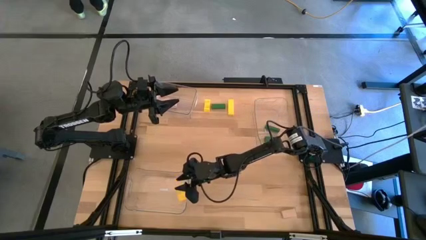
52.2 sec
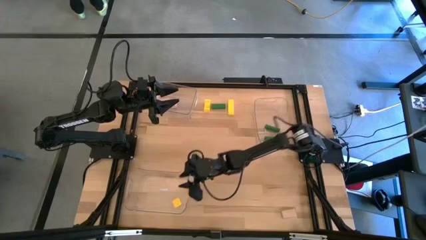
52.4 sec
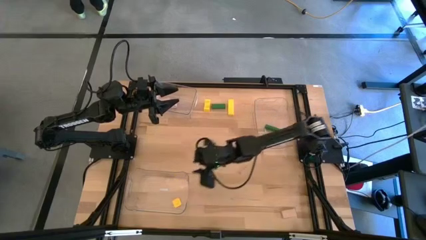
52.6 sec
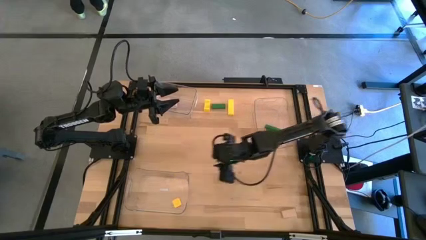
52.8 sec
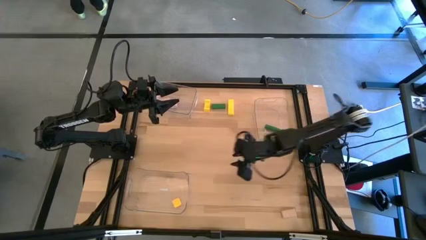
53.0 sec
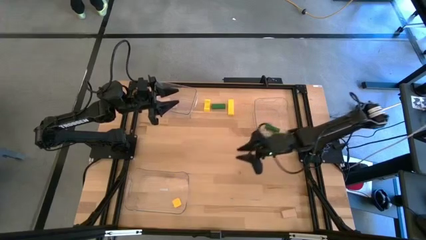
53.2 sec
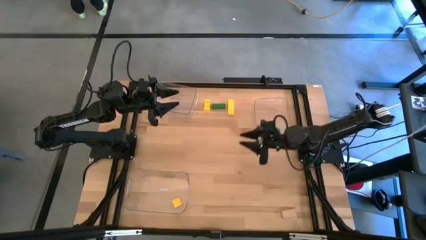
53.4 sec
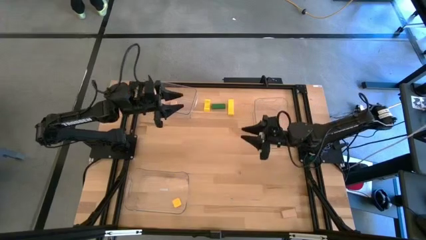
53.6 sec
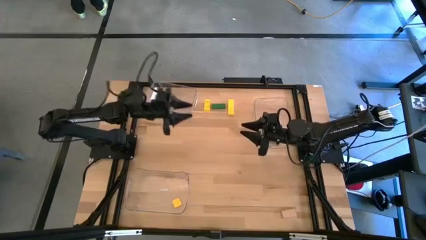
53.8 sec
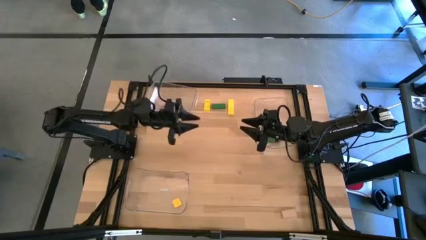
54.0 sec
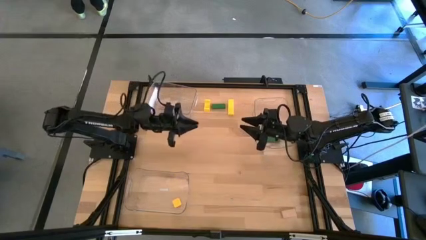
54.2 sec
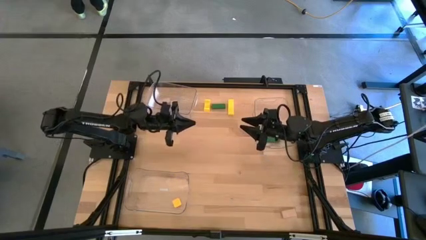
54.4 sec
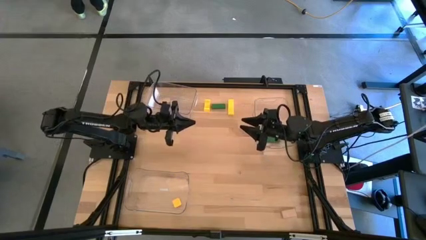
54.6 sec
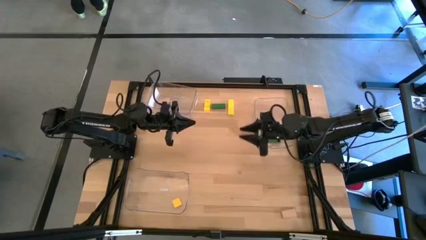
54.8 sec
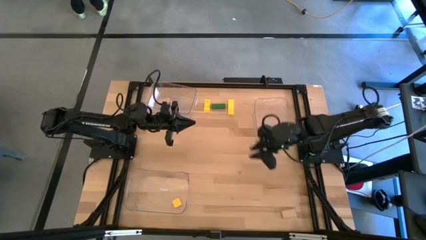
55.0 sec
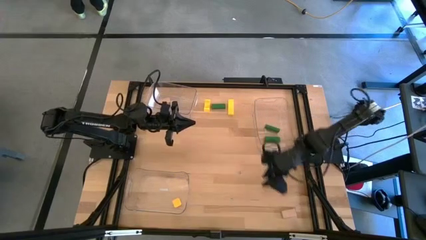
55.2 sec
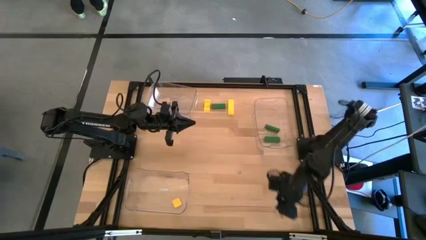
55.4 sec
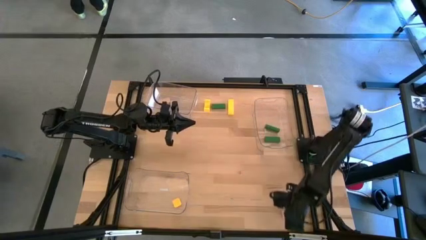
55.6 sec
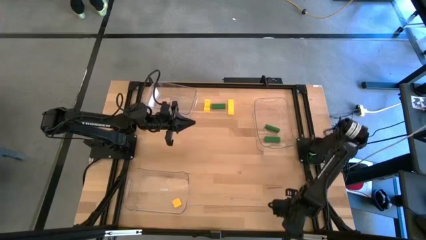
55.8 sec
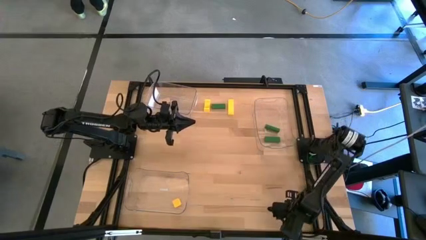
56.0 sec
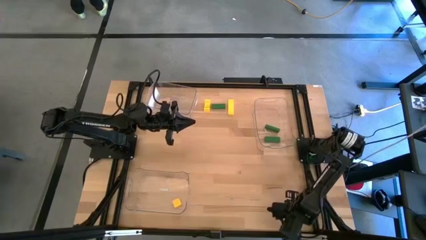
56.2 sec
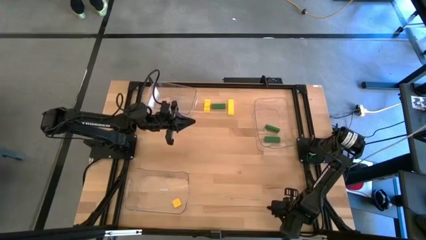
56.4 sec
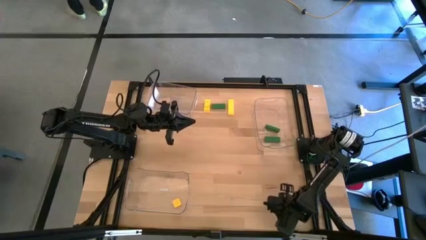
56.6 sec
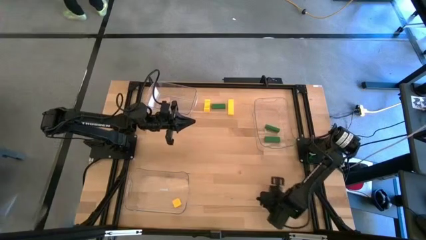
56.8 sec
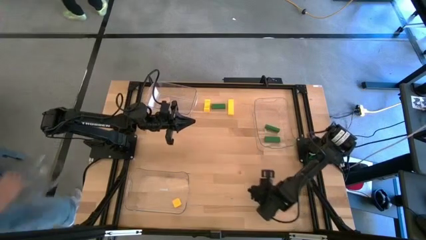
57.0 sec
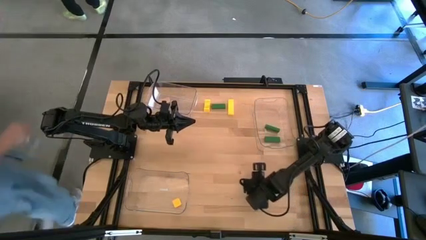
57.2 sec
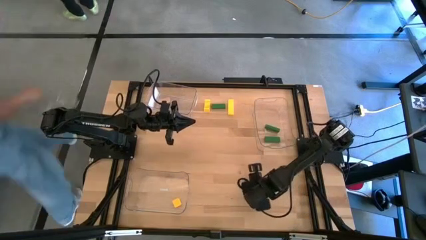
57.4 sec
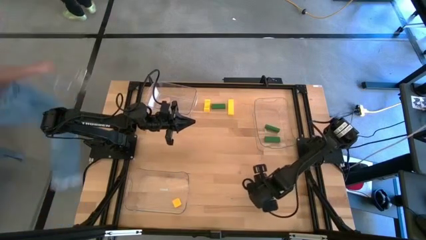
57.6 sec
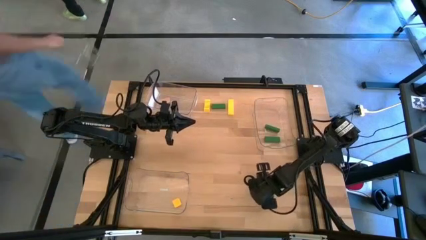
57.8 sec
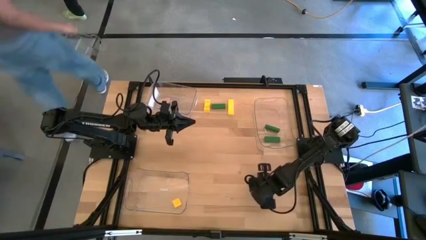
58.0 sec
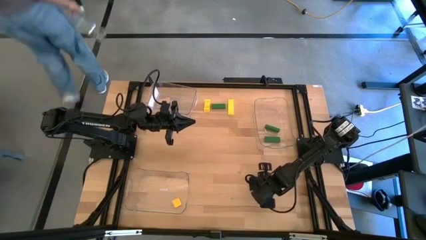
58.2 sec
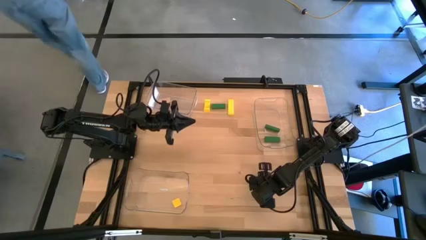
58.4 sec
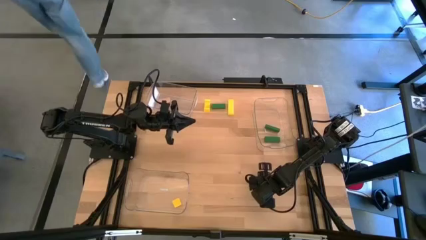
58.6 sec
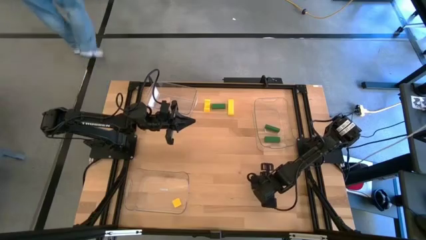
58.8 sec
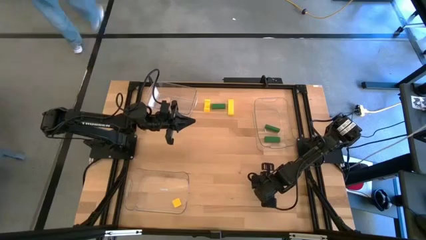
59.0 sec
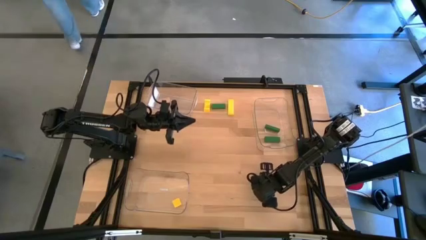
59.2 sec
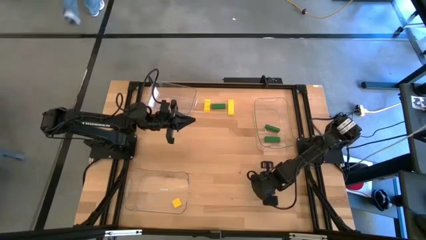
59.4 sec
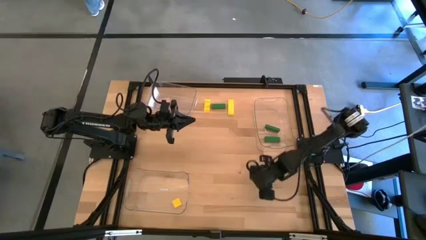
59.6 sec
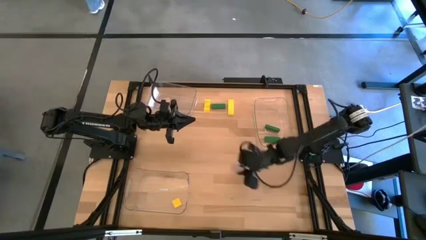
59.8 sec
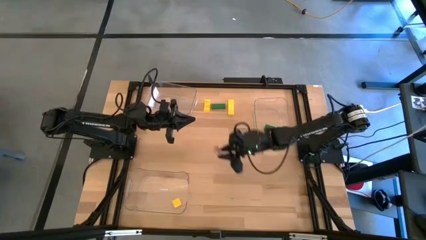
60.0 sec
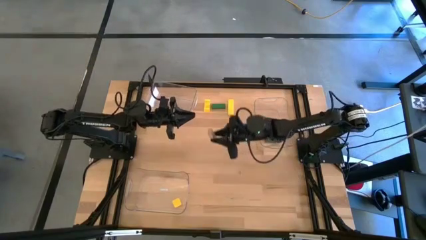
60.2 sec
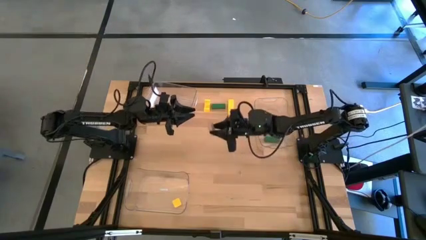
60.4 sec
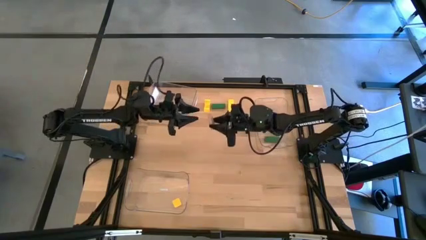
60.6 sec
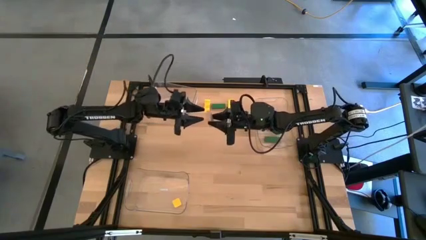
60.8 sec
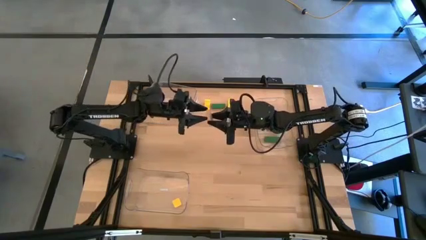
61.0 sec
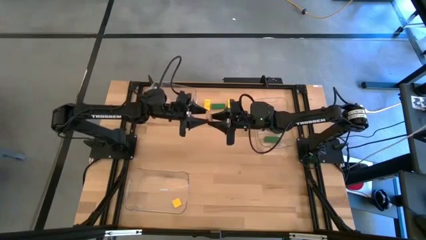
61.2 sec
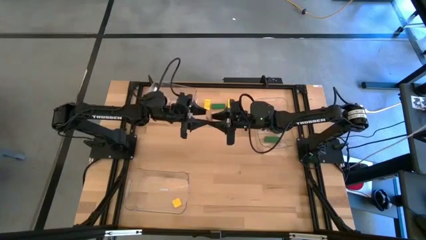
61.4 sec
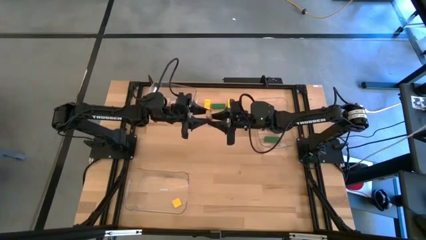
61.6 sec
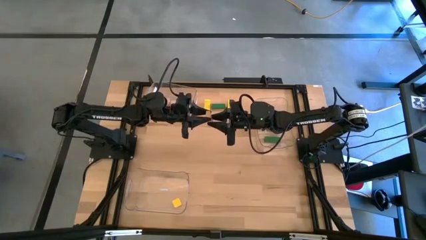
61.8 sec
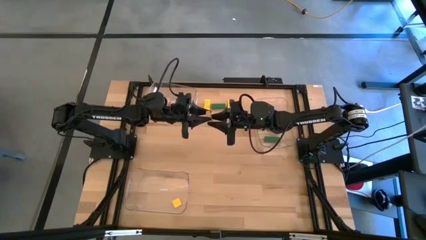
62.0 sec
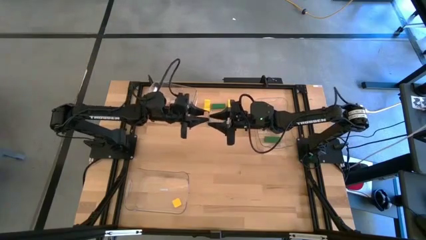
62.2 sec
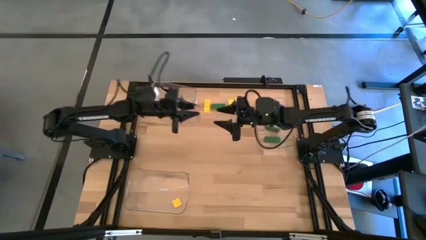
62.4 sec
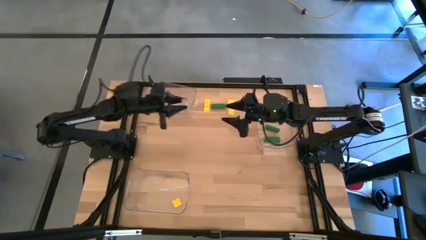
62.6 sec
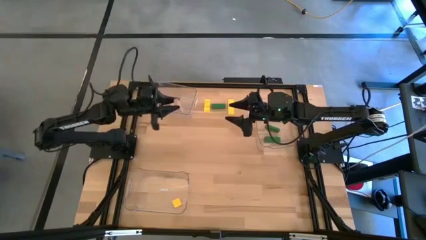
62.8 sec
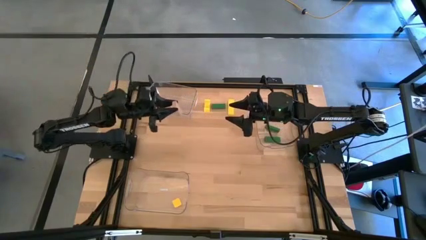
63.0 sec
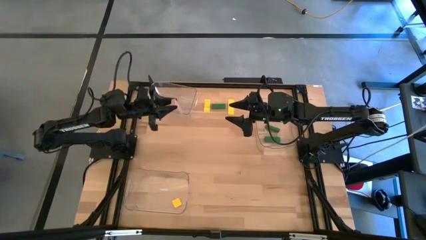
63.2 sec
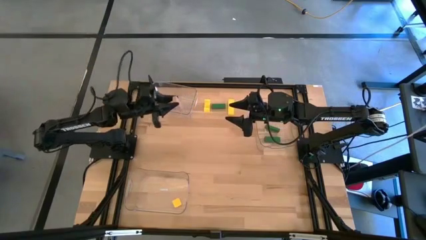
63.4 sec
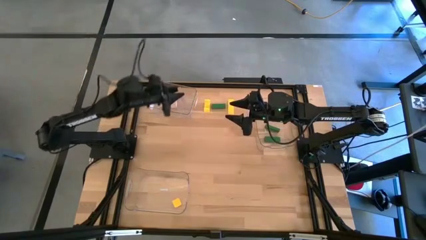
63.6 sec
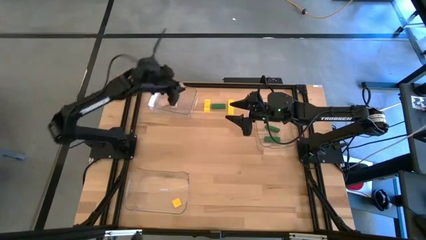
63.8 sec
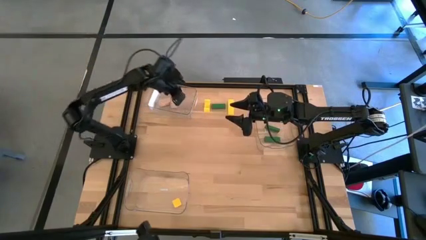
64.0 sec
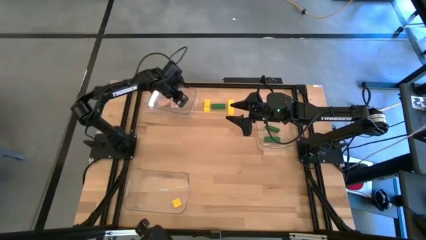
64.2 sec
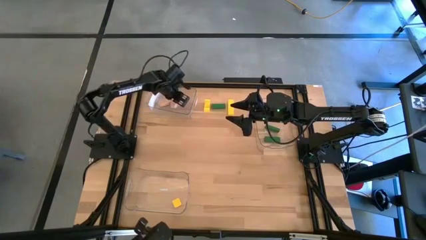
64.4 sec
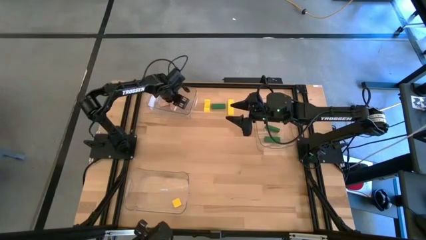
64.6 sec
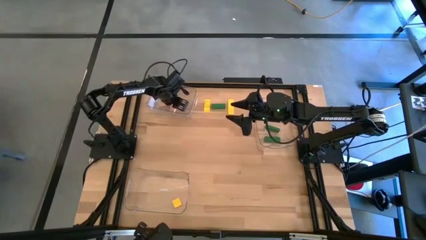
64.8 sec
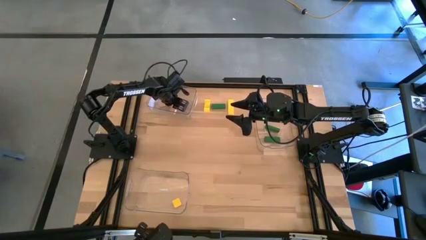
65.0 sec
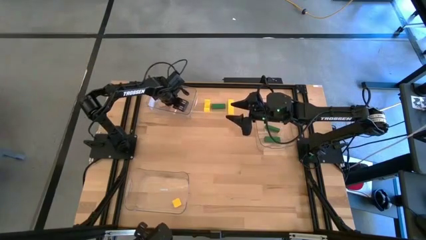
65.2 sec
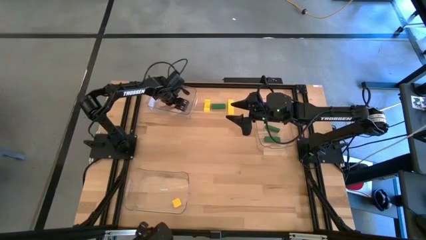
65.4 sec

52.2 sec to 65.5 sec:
Task: Sort & place blocks by color
Put the brown block into the top left transparent bin

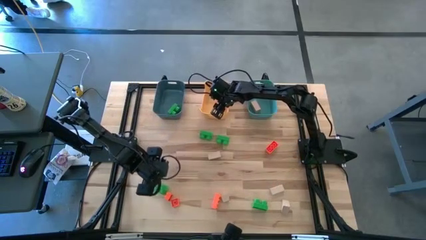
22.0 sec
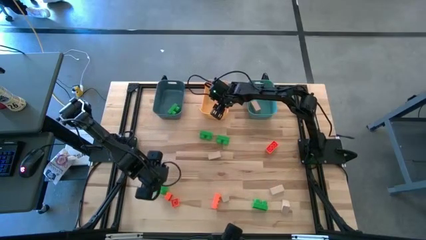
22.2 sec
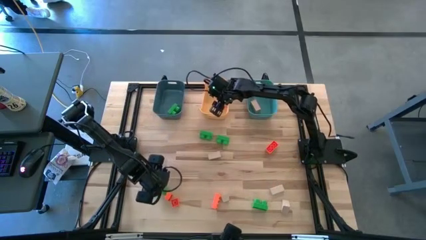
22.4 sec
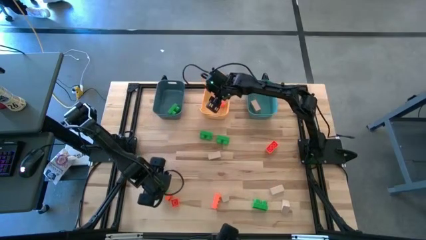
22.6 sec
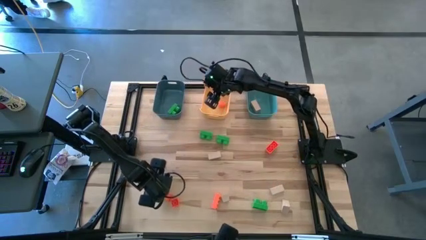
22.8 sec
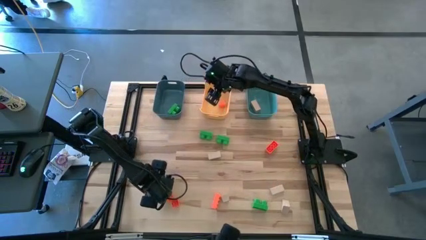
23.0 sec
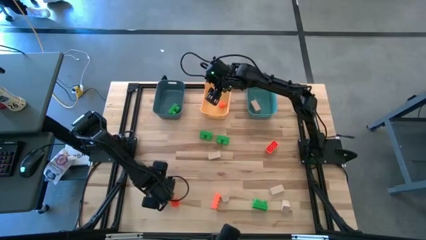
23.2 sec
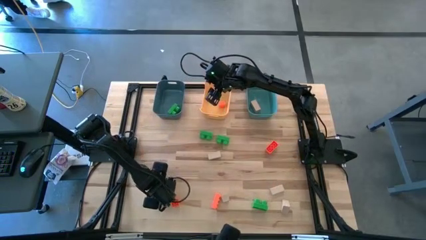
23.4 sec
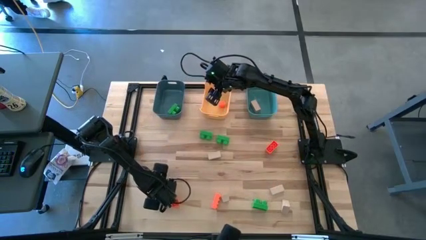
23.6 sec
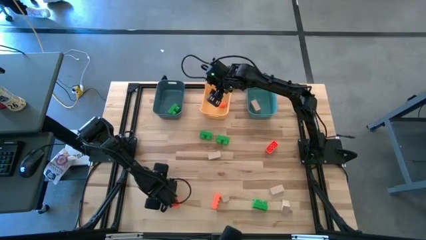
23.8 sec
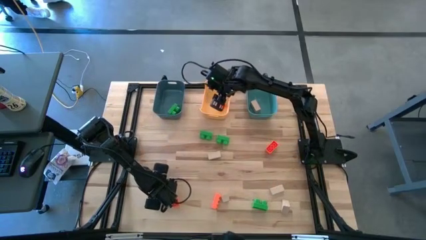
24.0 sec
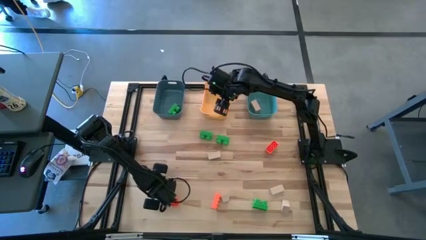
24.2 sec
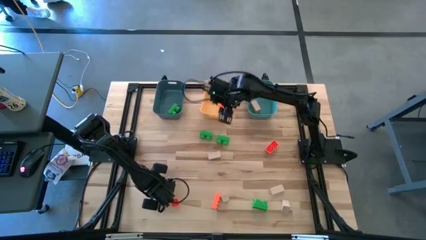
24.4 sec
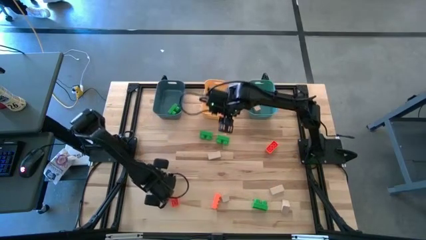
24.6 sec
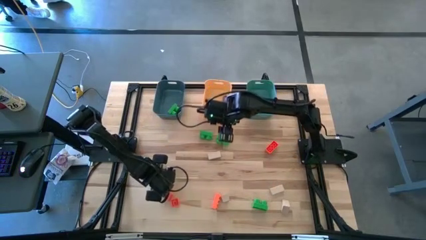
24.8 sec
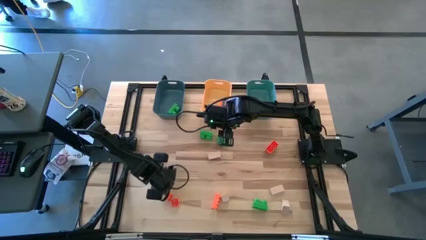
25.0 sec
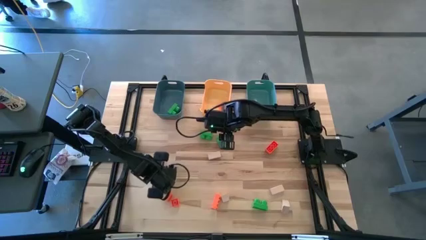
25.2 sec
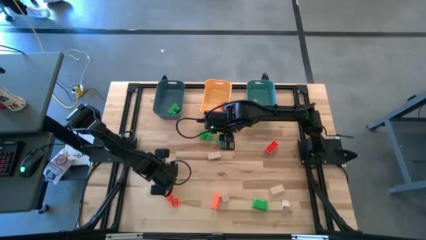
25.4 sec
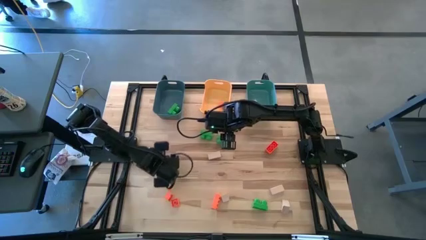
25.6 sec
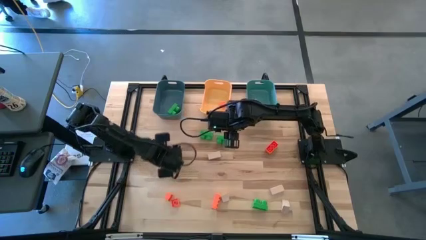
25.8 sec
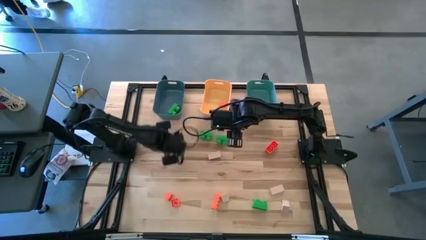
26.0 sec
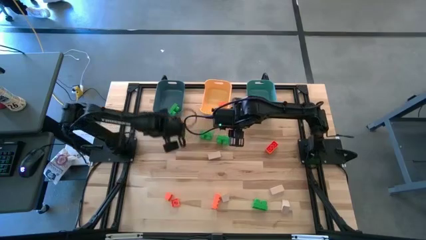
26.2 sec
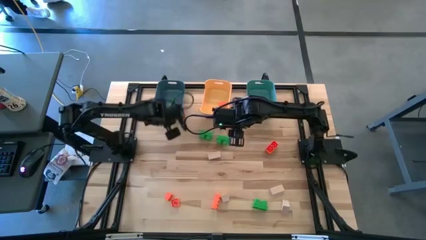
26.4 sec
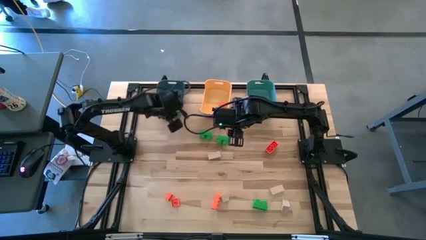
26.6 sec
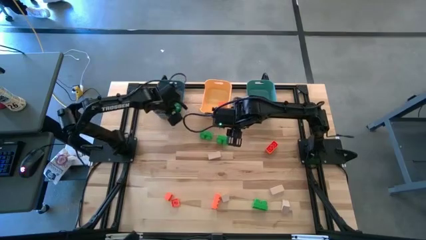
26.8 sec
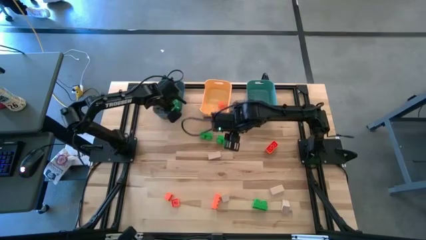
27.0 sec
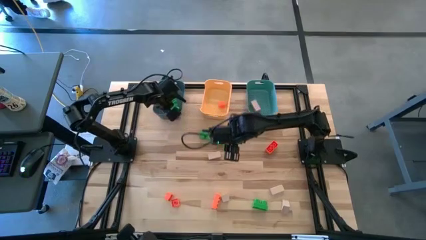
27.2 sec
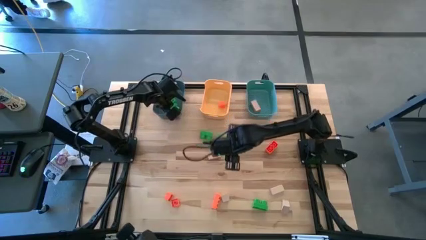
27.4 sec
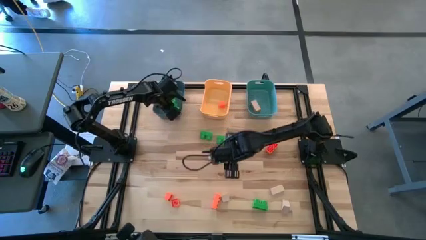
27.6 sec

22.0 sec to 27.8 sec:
Task: Sort & place blocks by color
Put the green game piece into the blue bin
